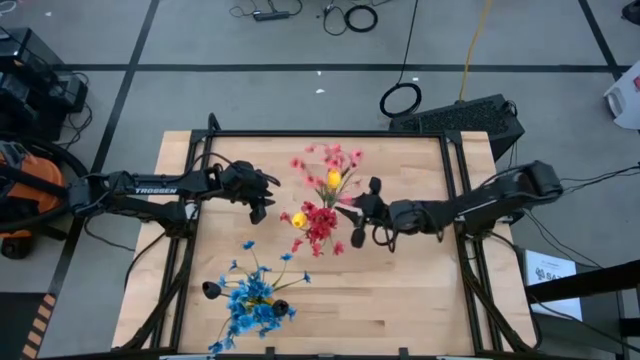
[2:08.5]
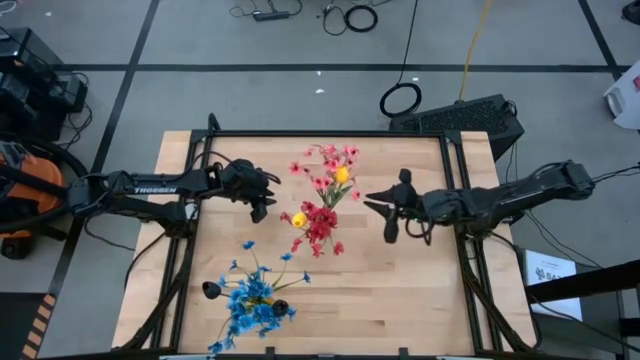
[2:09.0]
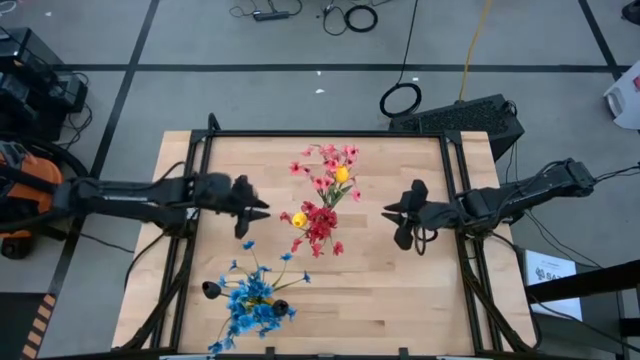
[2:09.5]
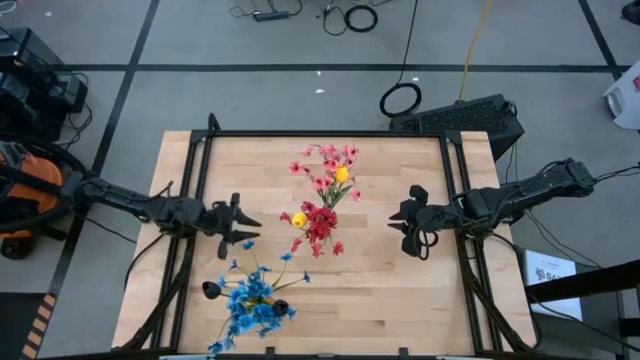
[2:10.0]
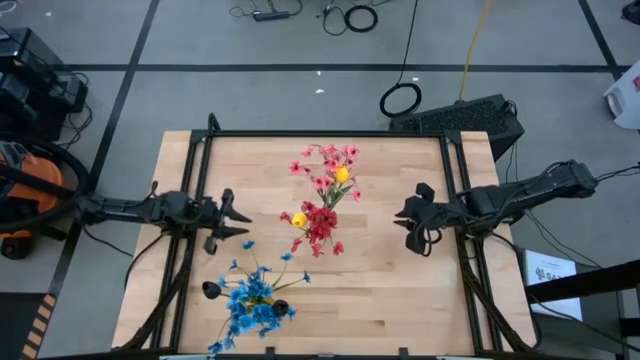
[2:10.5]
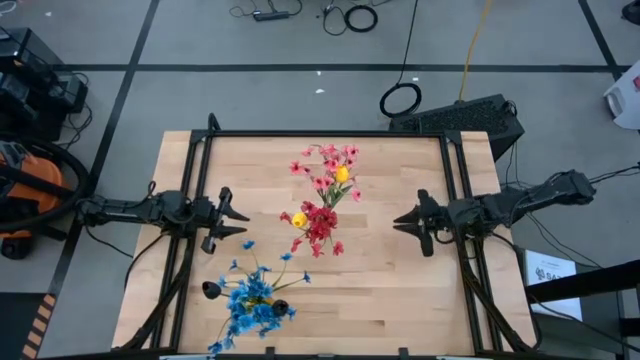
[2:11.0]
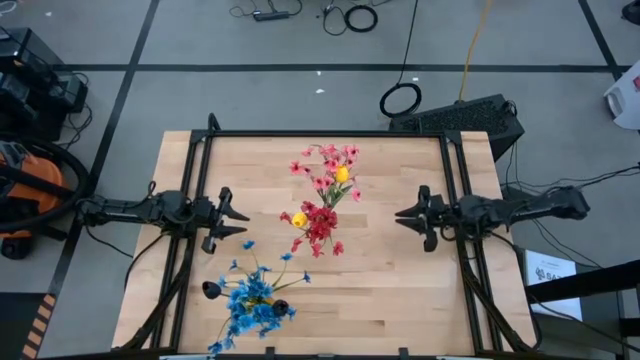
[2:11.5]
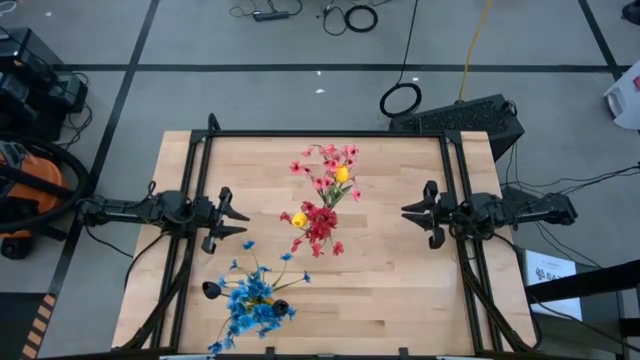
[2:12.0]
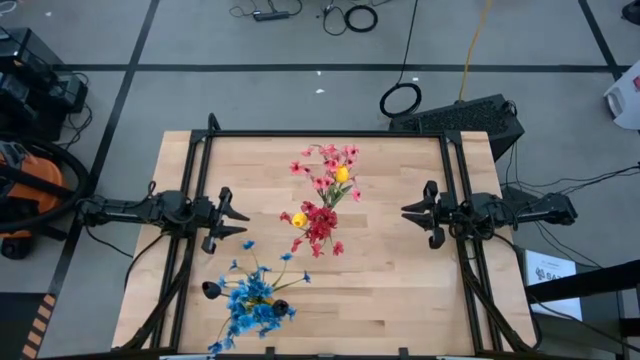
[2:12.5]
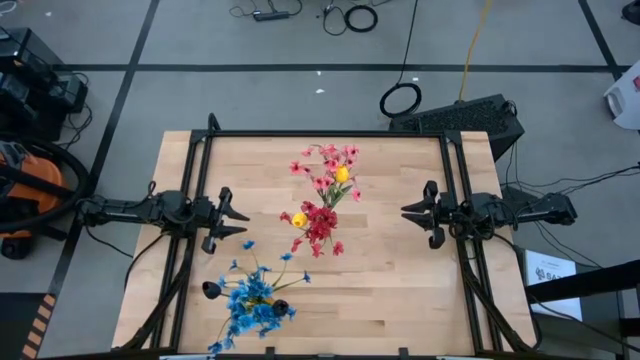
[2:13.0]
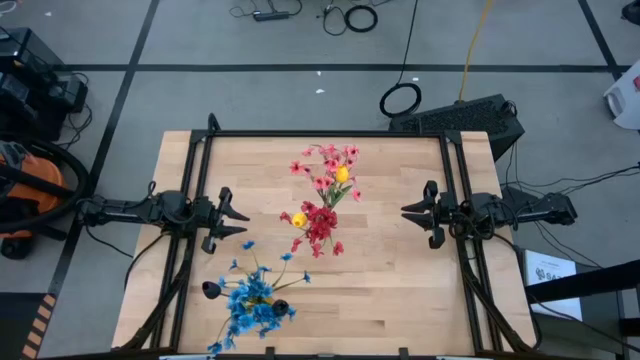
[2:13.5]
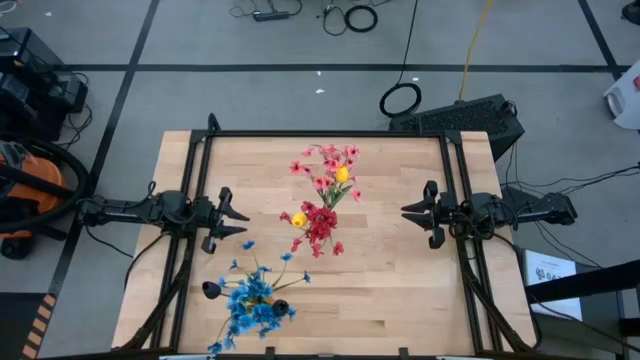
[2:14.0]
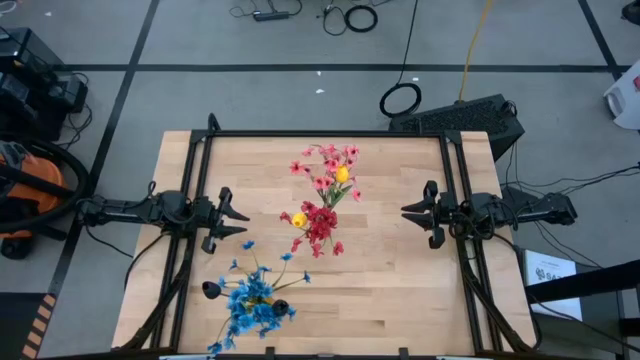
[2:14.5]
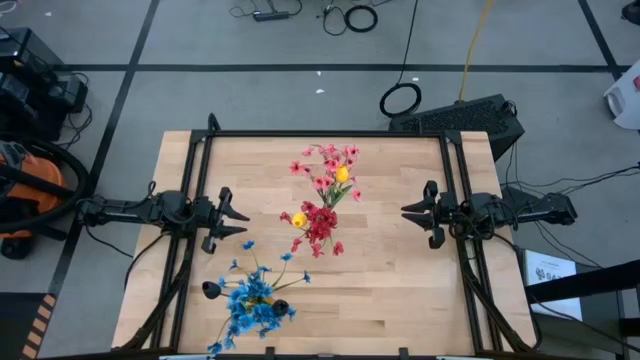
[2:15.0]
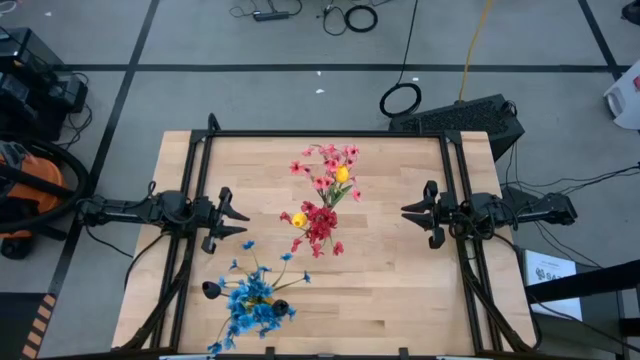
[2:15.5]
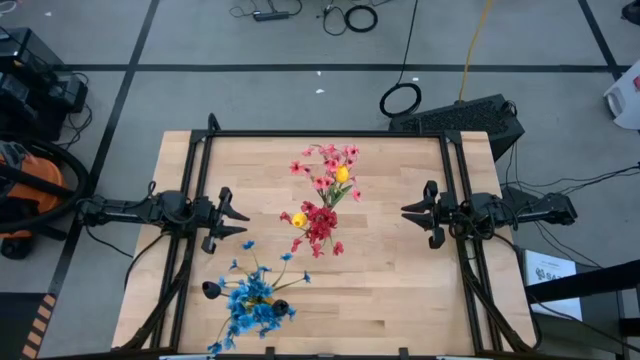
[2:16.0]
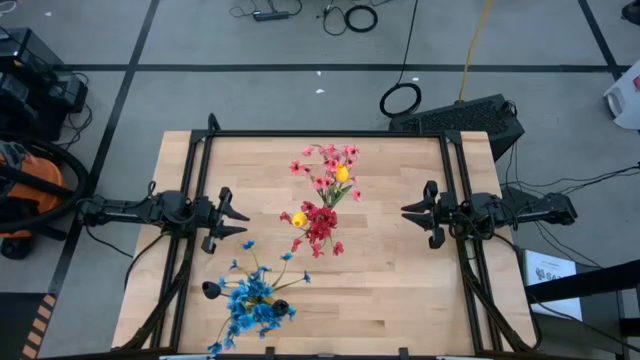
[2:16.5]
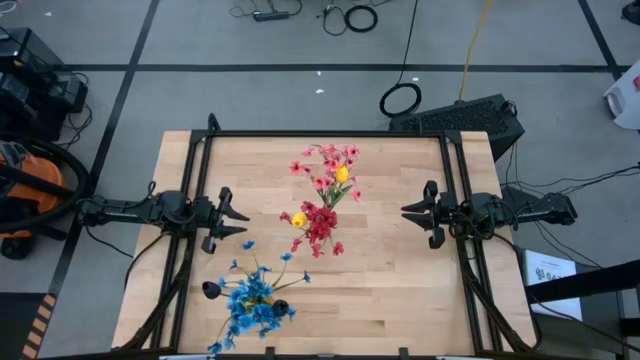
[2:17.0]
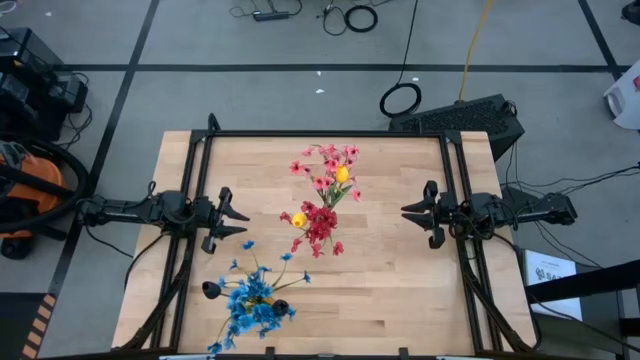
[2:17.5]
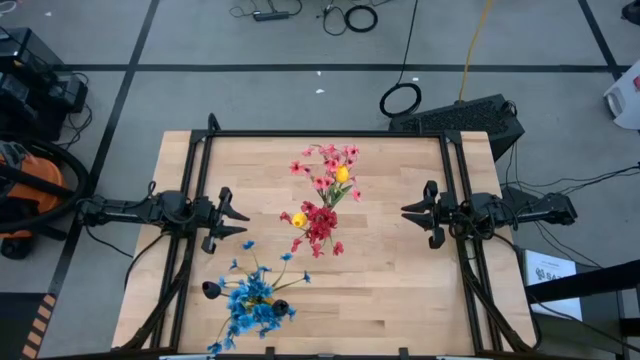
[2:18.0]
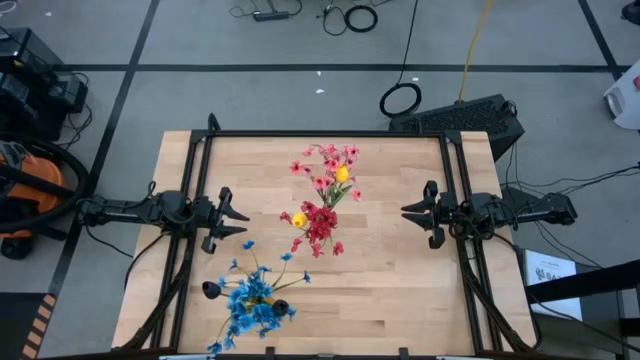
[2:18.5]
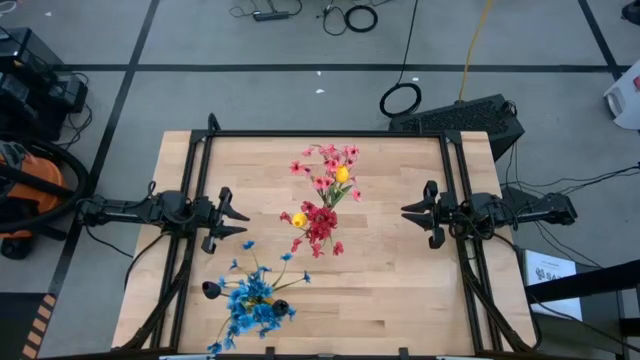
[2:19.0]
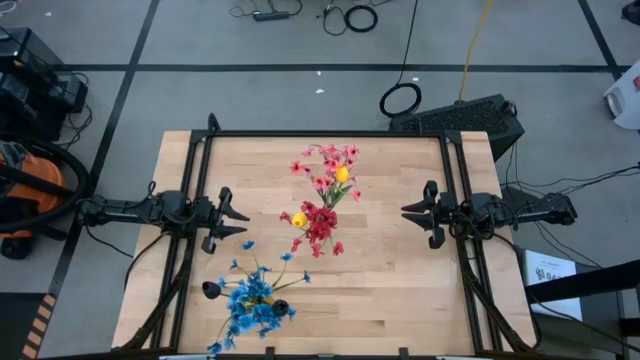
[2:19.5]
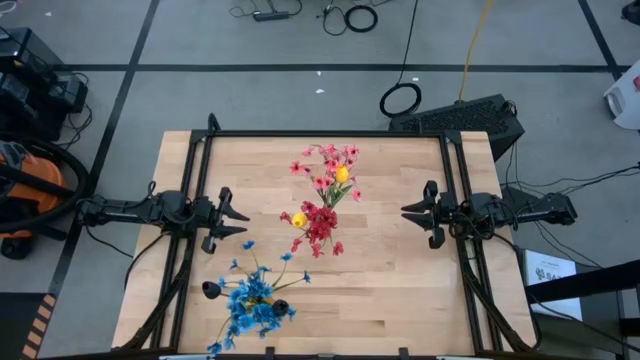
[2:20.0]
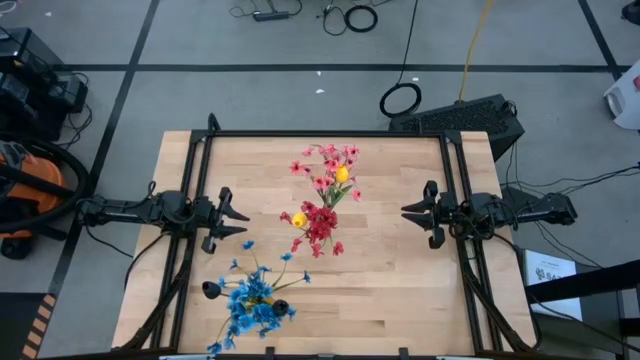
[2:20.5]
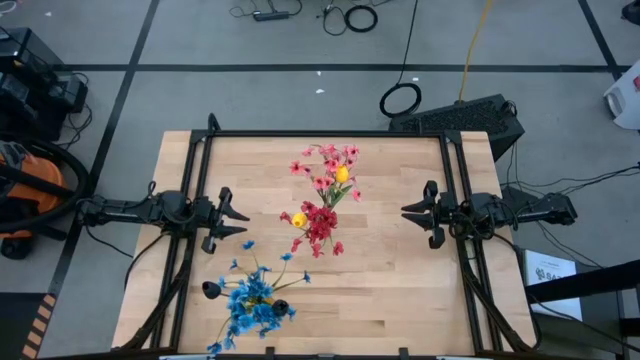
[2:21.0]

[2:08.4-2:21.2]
Task: Sort flowers into vase by color
Return to Home Position

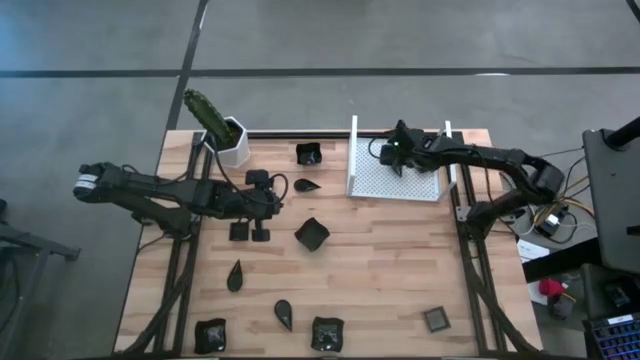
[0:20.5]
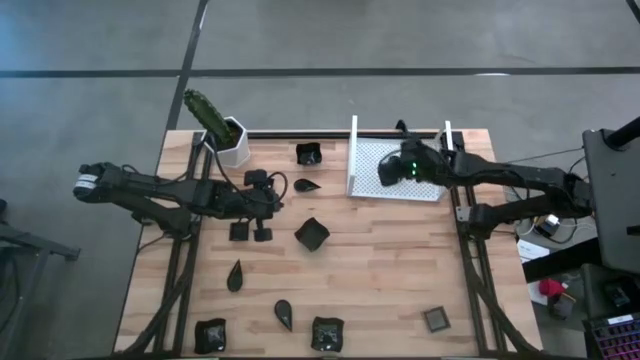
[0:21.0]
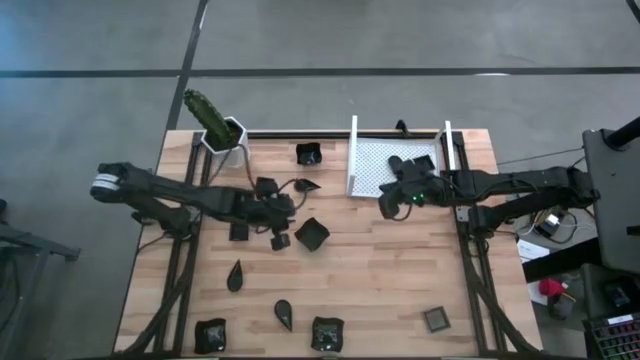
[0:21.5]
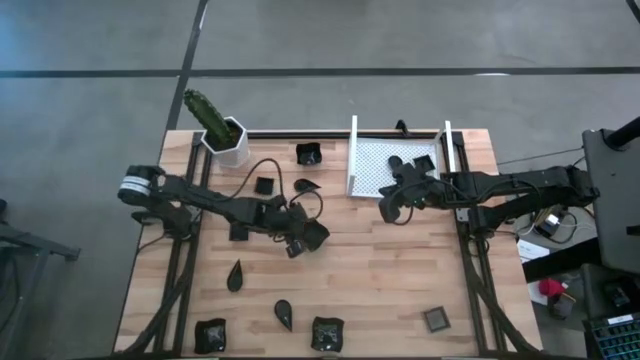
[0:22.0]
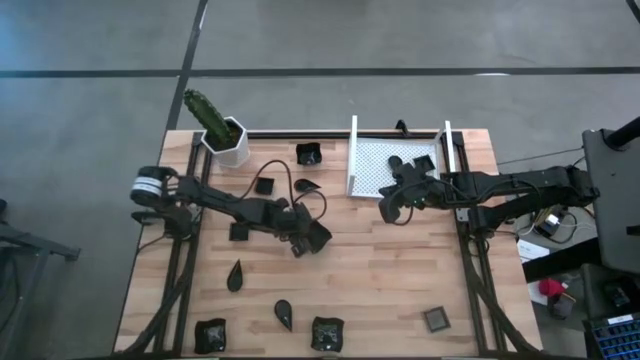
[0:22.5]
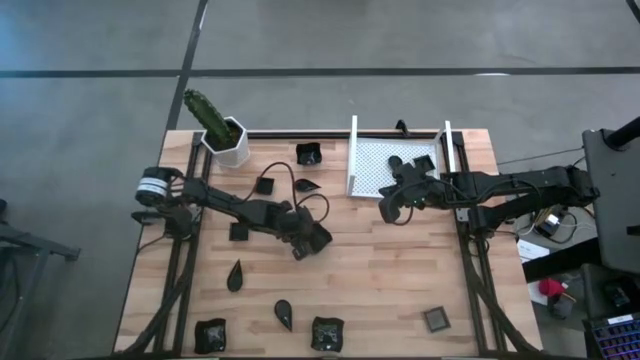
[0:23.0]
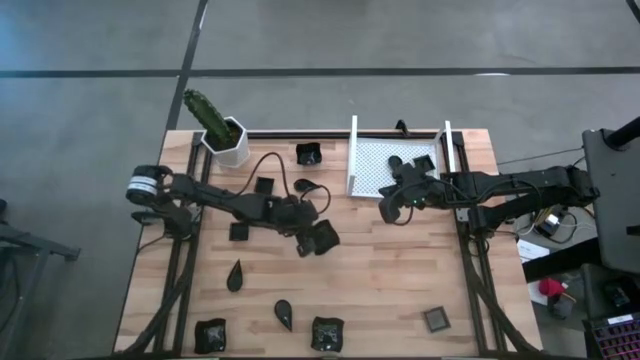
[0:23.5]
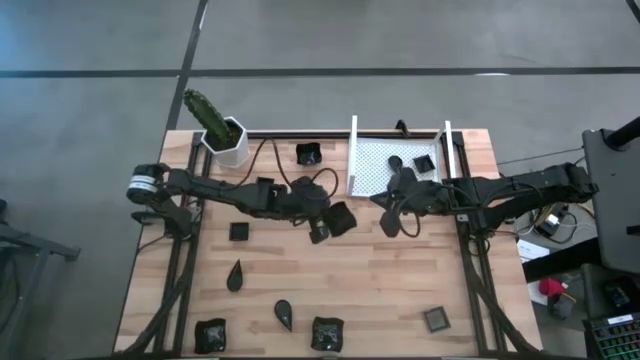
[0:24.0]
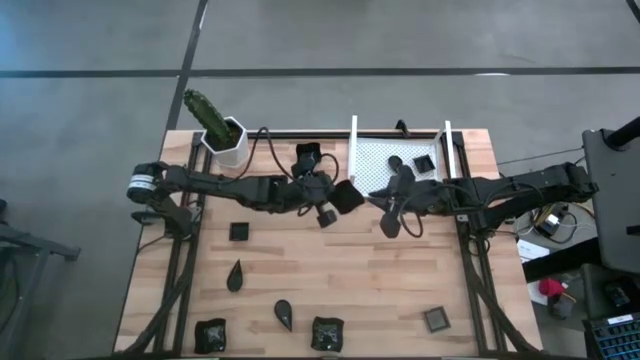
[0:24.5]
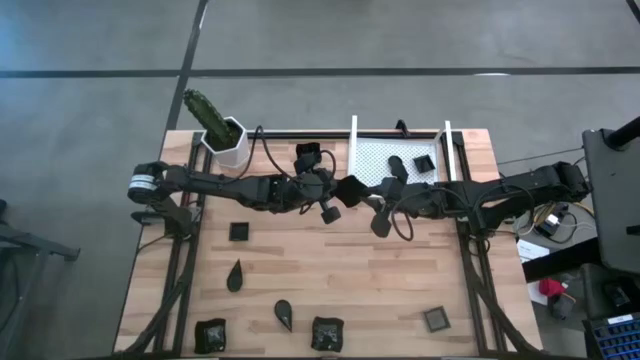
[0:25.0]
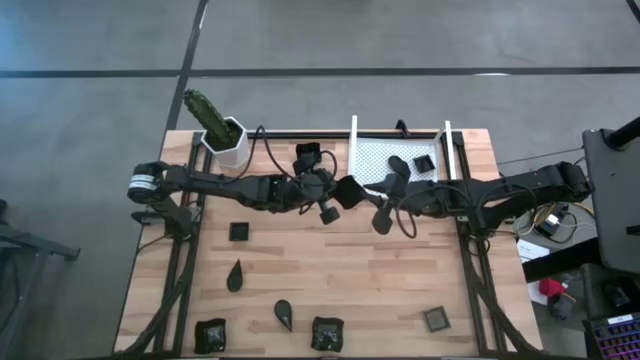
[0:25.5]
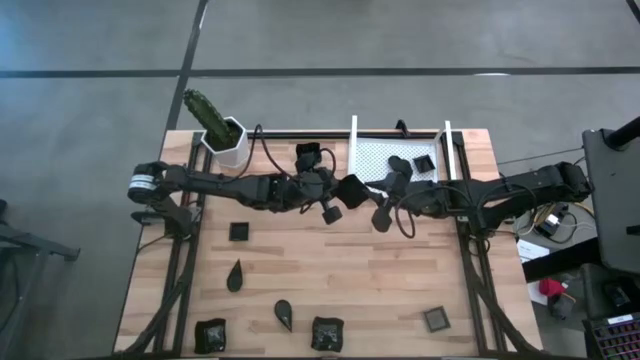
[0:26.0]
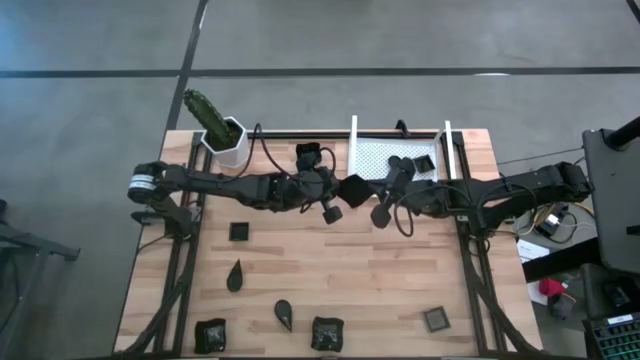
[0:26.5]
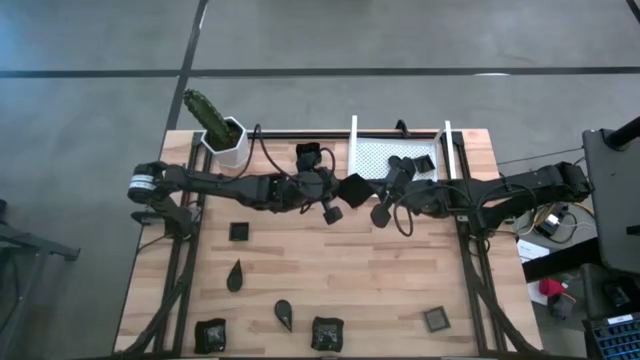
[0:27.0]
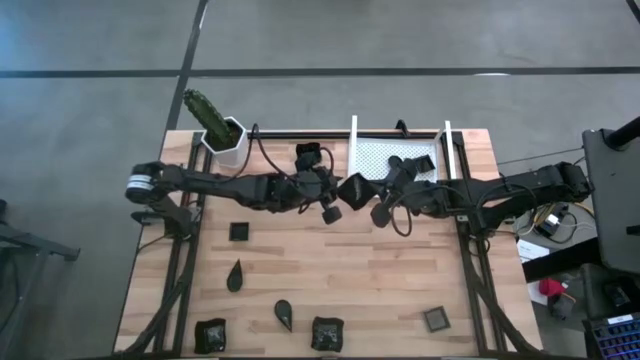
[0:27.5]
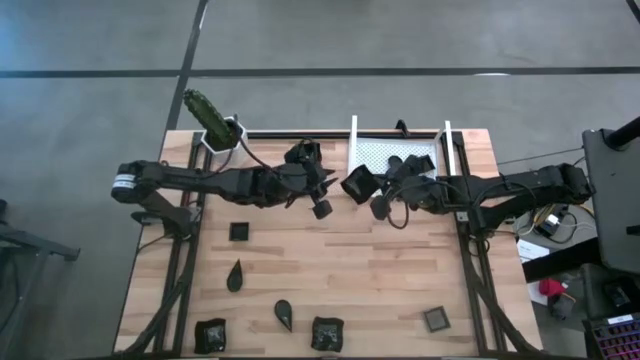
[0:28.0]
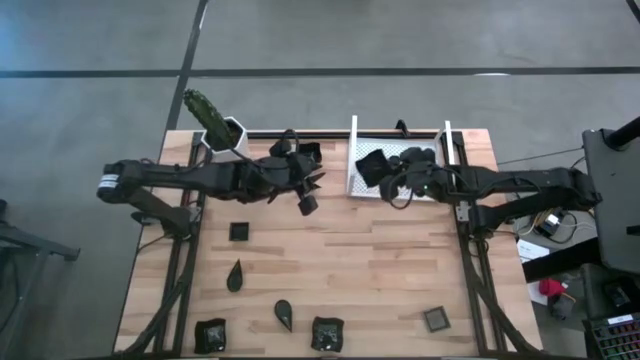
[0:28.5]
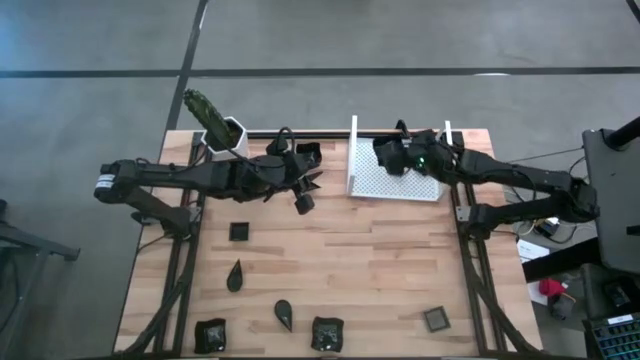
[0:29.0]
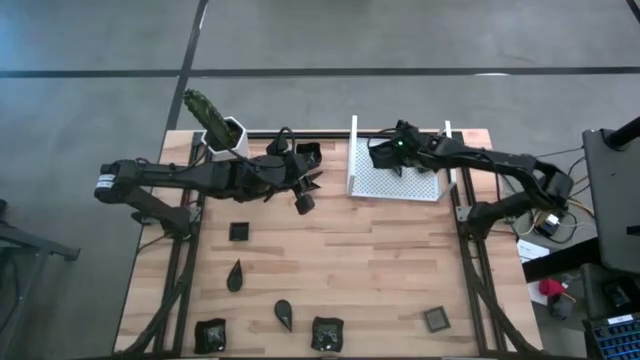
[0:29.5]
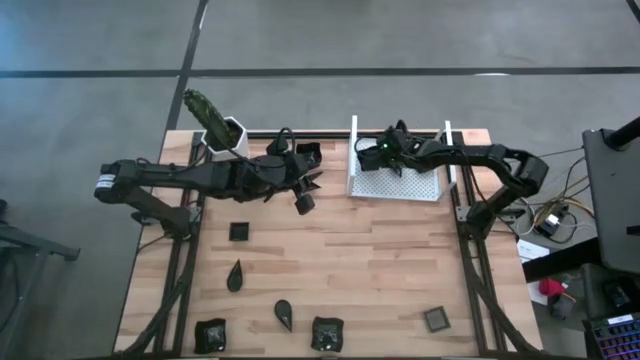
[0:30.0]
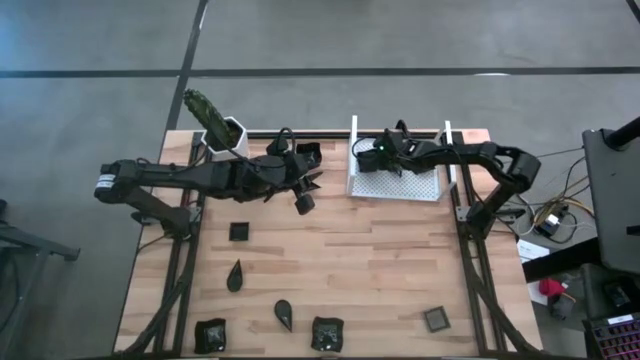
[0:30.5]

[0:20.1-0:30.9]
Task: Pick & Place Mini shaped plates
Put the black distorted square plate on the shelf
